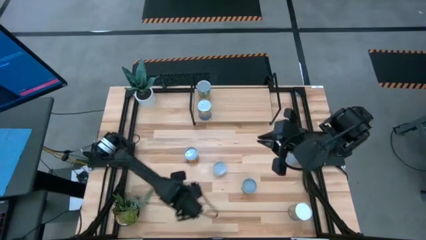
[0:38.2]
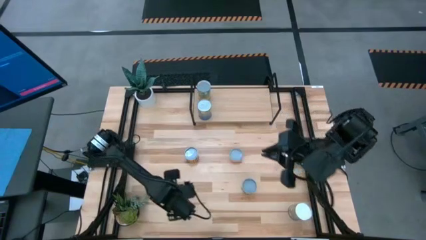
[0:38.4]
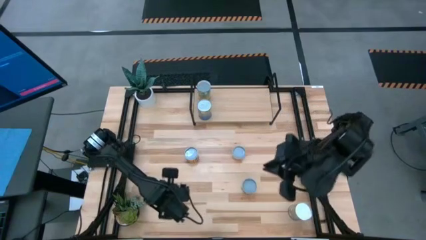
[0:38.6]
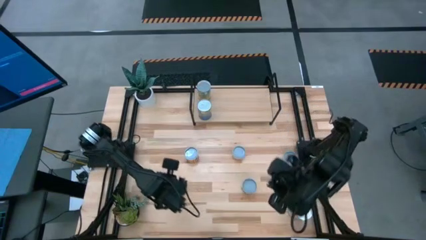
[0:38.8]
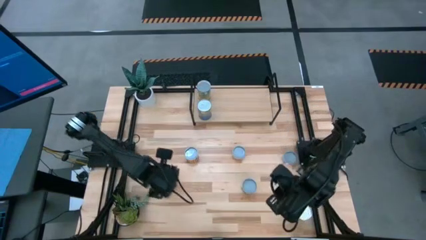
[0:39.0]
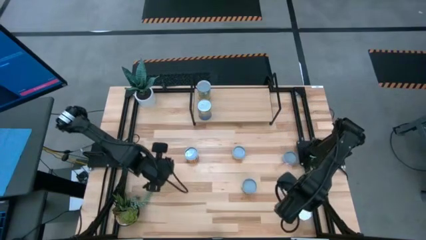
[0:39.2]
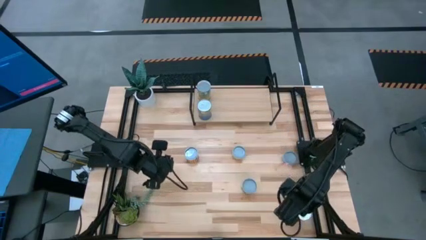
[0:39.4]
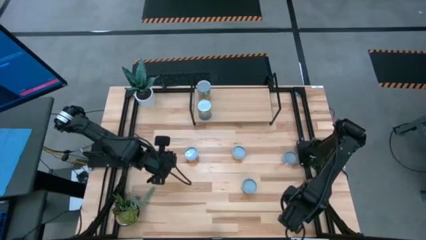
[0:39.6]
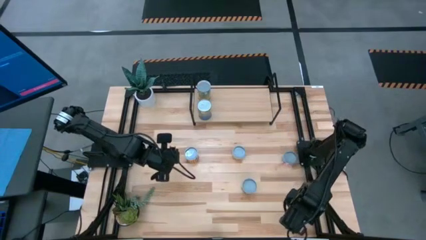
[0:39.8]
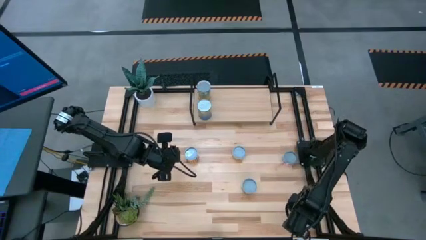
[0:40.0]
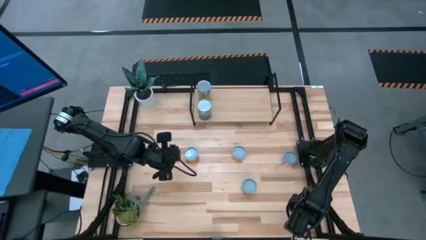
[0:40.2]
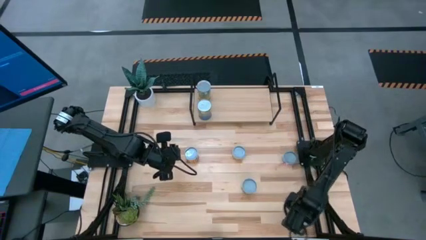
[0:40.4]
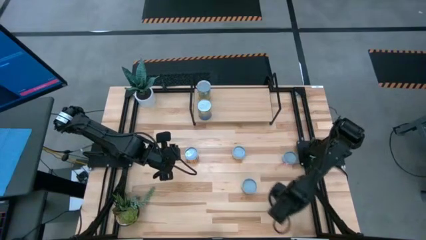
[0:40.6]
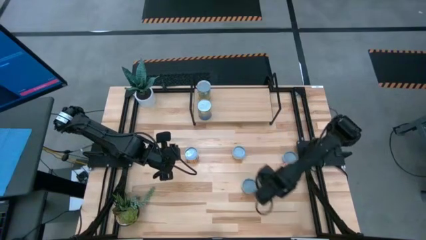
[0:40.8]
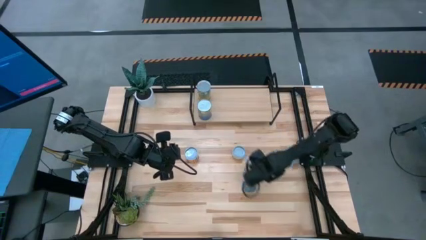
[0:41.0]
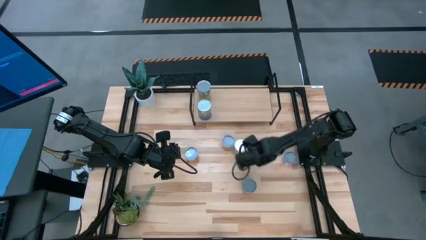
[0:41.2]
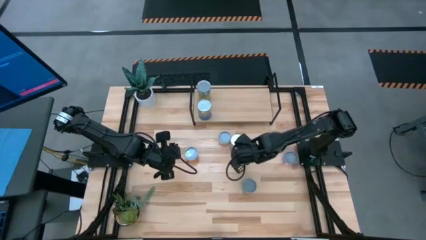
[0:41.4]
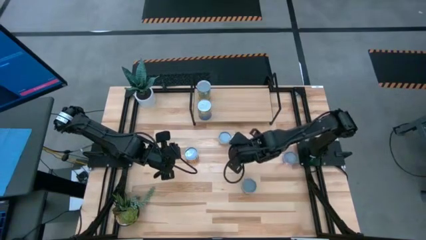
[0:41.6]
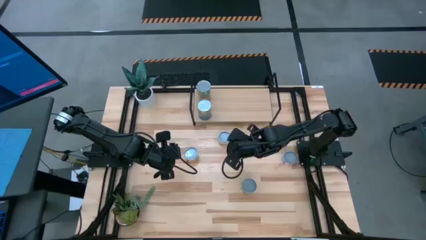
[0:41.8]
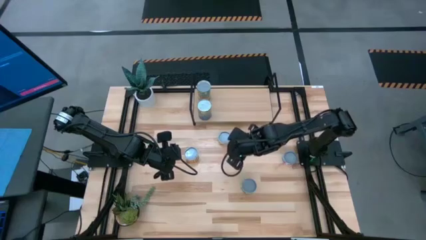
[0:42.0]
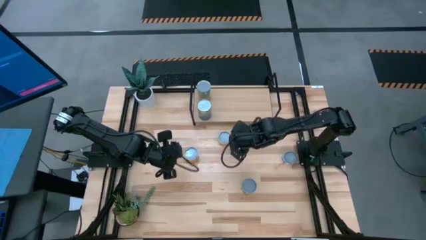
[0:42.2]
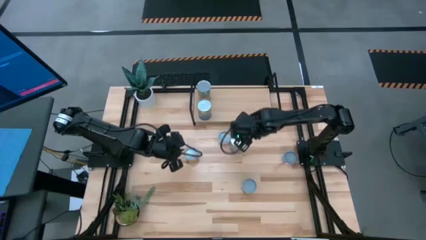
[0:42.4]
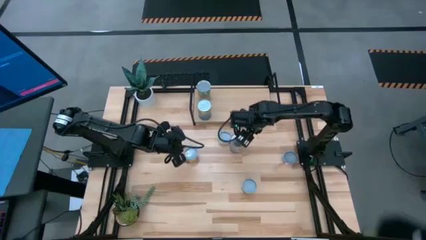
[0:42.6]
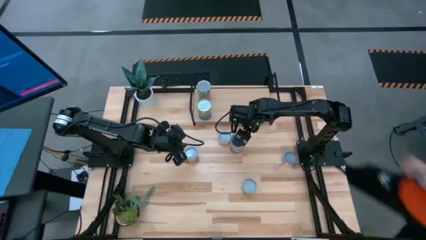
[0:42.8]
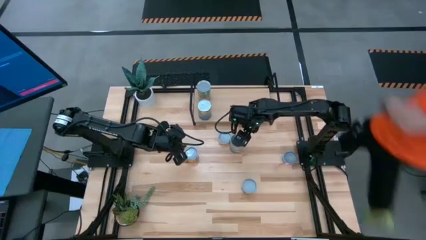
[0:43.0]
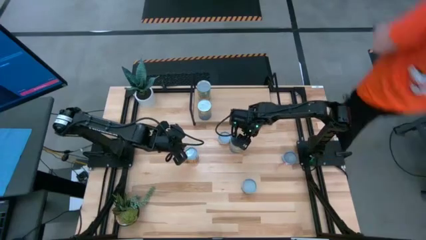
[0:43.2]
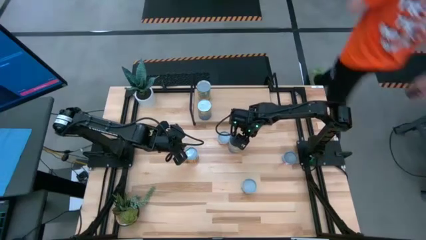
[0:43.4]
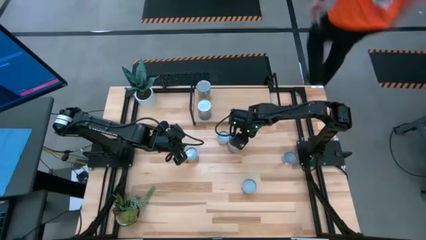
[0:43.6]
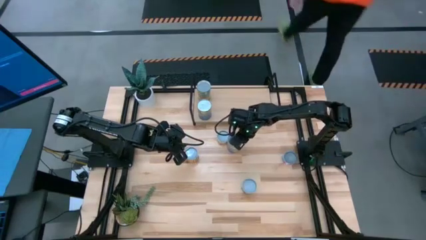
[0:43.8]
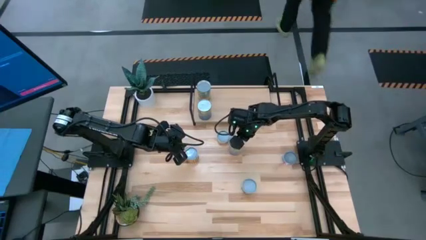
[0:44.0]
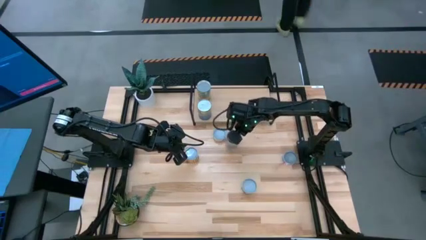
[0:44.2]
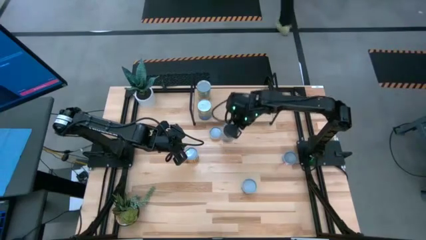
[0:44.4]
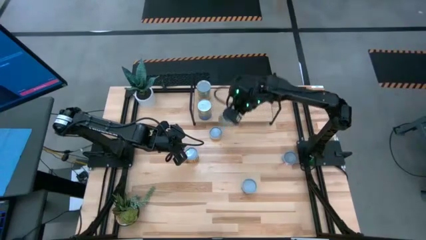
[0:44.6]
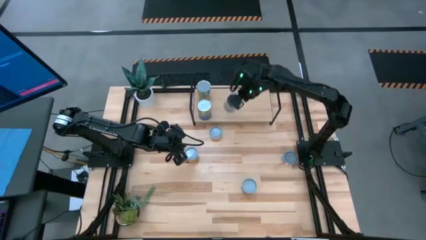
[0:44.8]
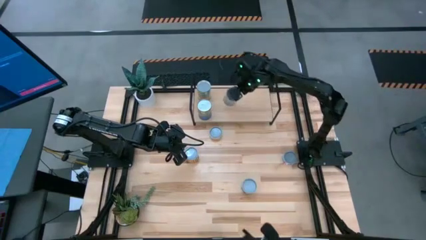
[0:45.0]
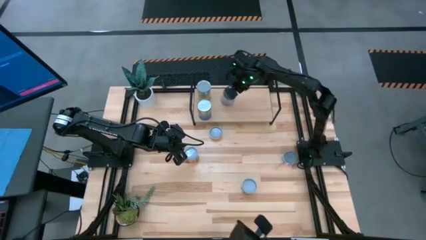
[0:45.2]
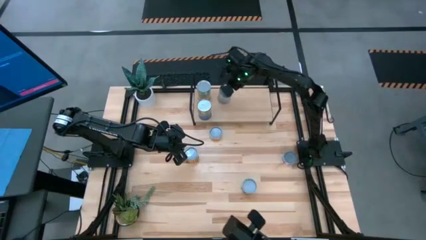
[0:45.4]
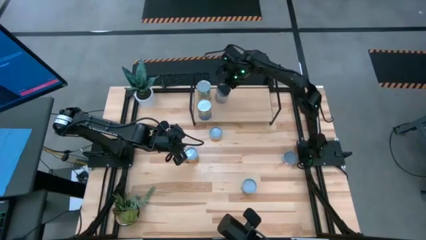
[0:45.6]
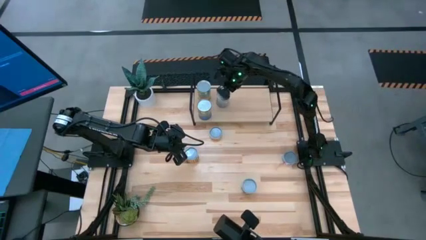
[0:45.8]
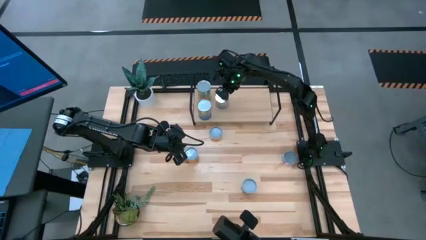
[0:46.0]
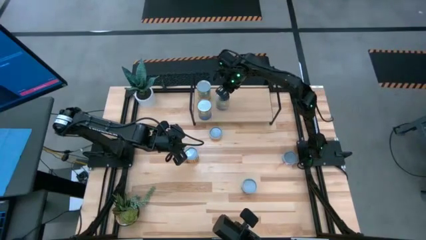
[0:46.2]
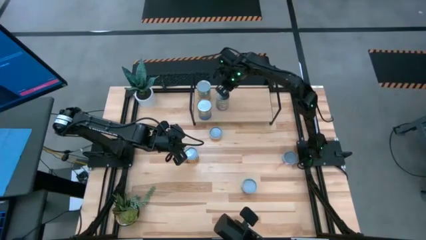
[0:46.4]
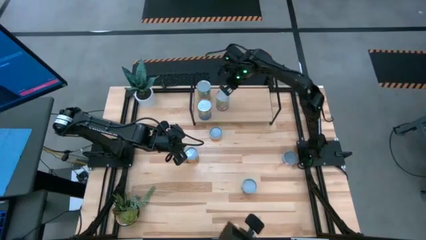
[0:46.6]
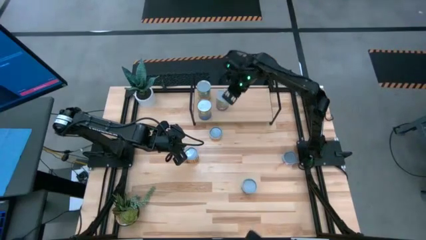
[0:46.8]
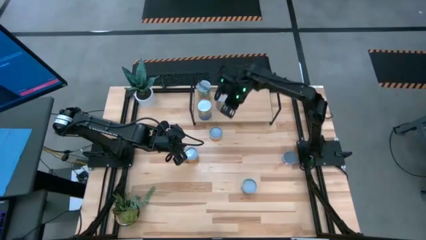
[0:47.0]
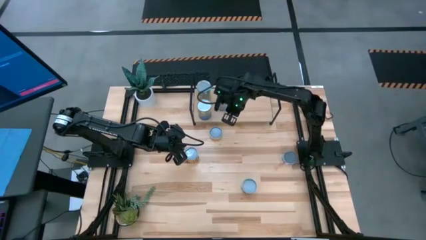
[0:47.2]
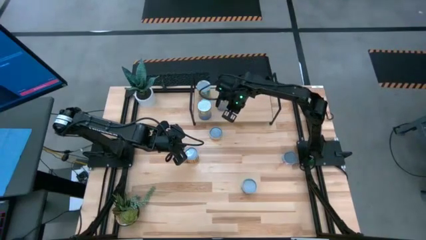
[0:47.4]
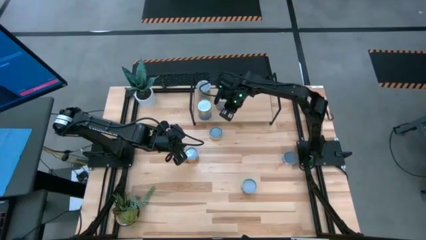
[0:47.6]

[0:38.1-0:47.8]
Task: Pick and place cans onto a shelf
Put the canned peaches on the shelf

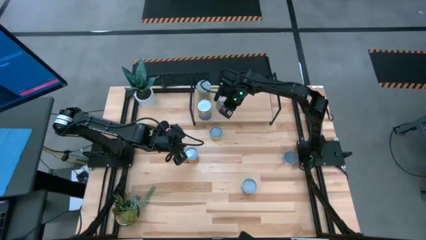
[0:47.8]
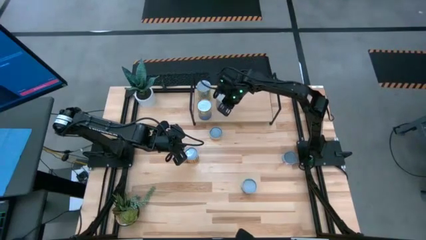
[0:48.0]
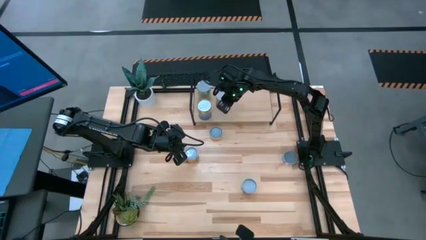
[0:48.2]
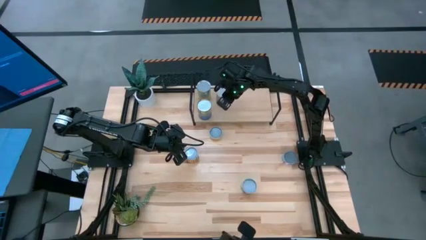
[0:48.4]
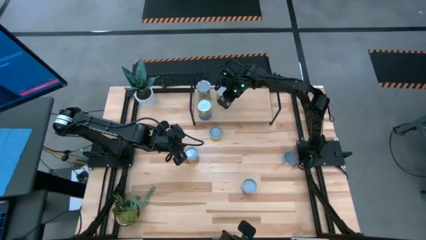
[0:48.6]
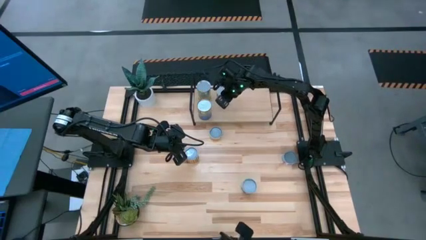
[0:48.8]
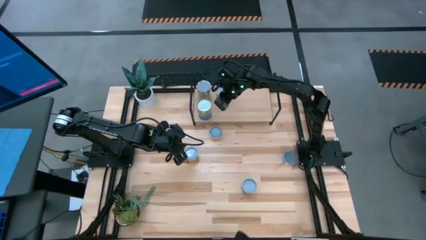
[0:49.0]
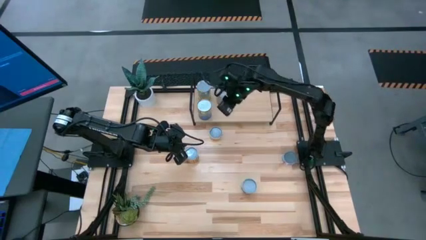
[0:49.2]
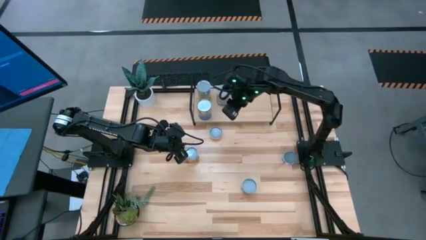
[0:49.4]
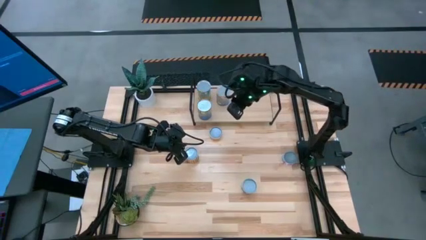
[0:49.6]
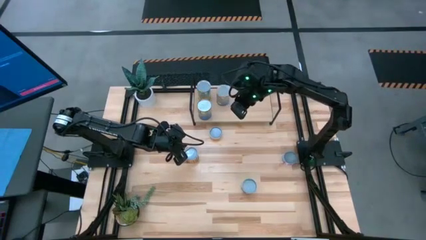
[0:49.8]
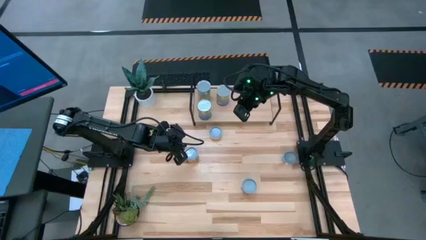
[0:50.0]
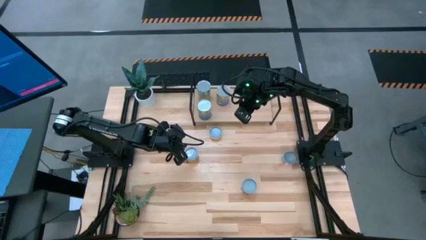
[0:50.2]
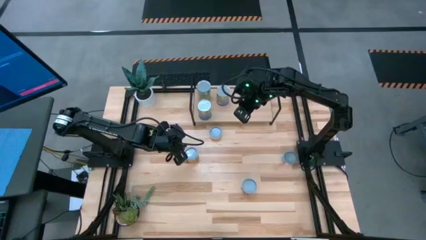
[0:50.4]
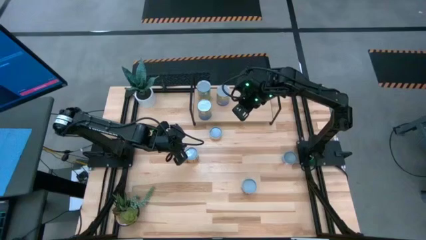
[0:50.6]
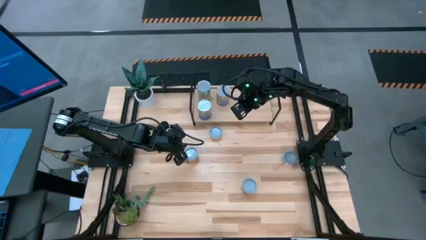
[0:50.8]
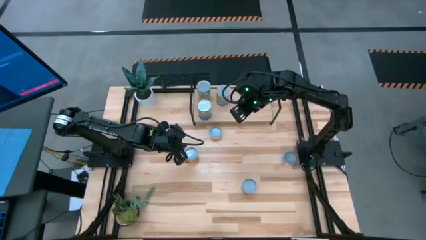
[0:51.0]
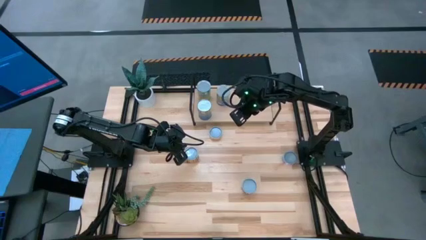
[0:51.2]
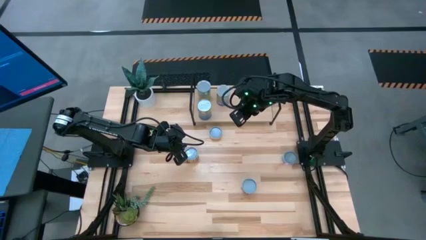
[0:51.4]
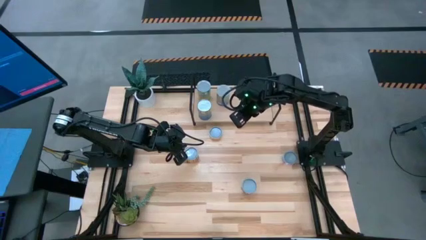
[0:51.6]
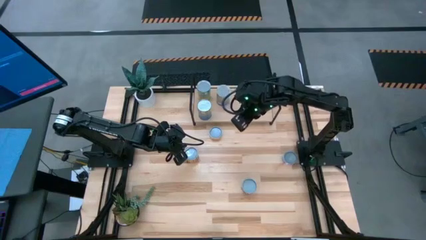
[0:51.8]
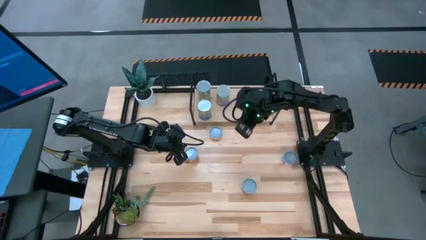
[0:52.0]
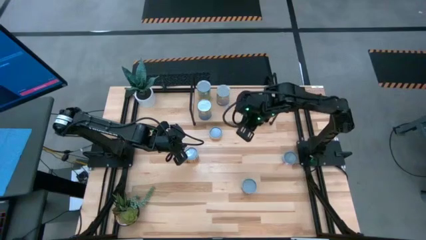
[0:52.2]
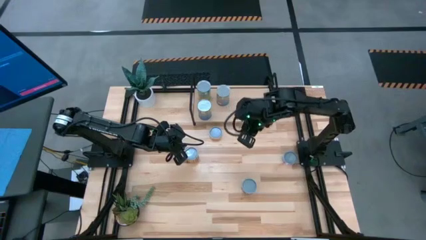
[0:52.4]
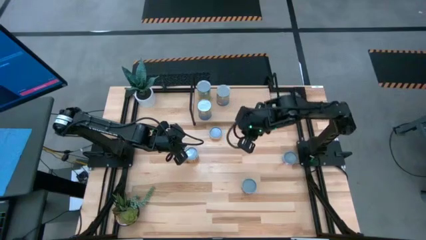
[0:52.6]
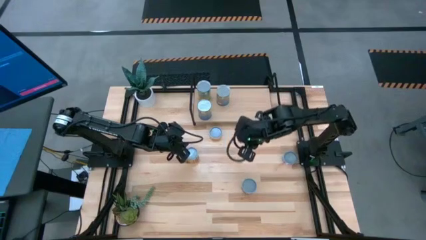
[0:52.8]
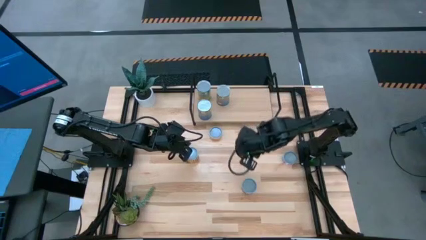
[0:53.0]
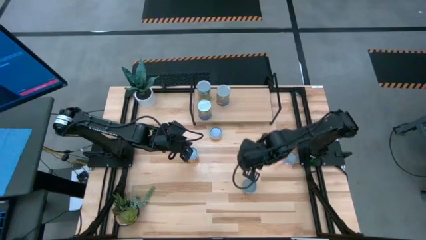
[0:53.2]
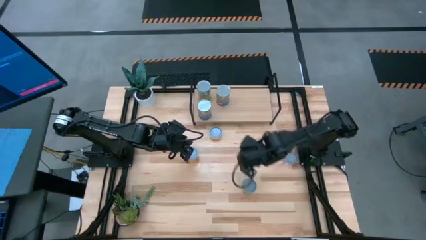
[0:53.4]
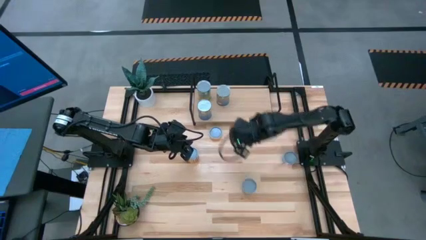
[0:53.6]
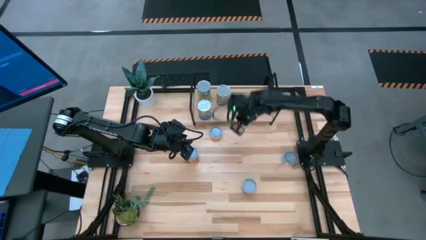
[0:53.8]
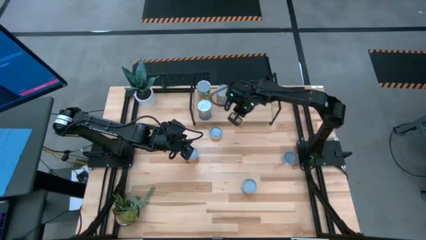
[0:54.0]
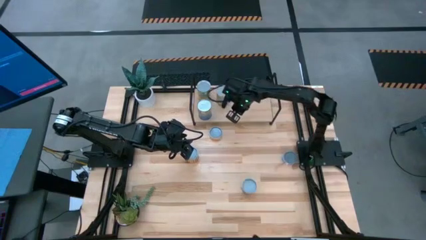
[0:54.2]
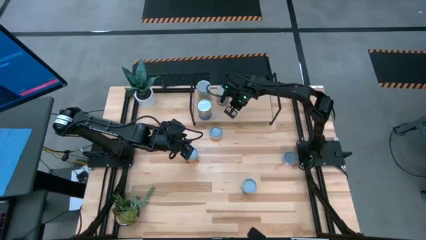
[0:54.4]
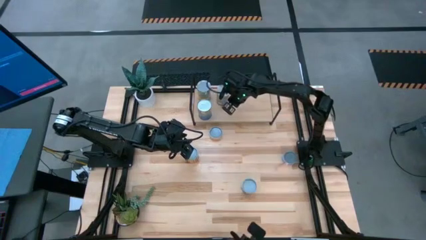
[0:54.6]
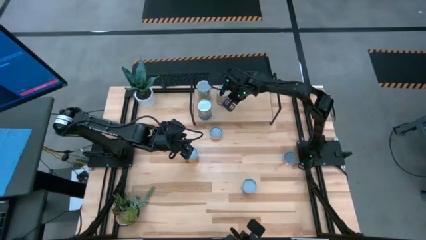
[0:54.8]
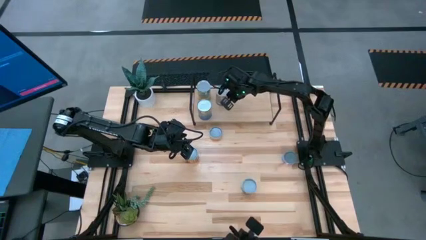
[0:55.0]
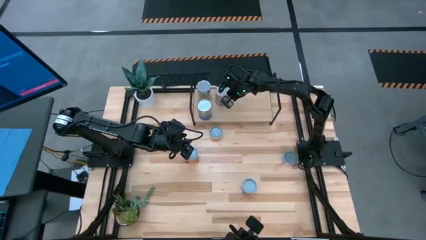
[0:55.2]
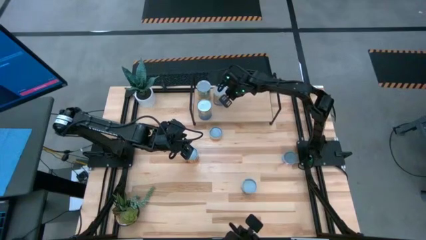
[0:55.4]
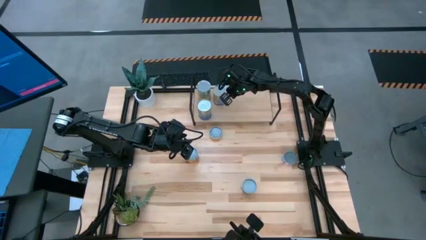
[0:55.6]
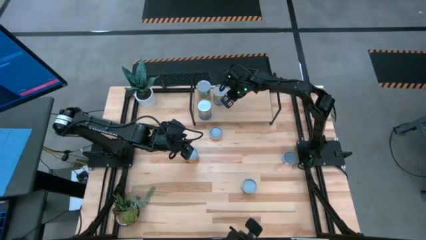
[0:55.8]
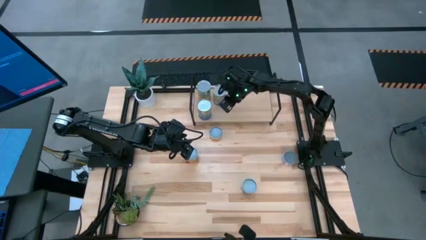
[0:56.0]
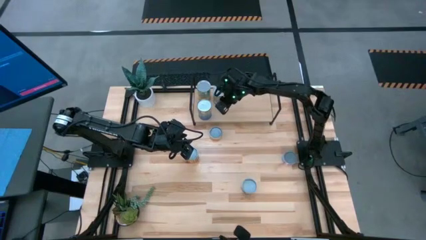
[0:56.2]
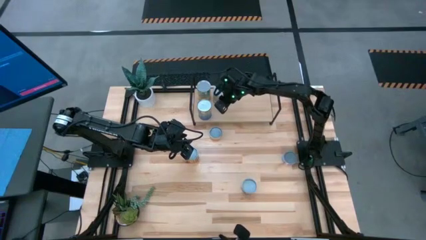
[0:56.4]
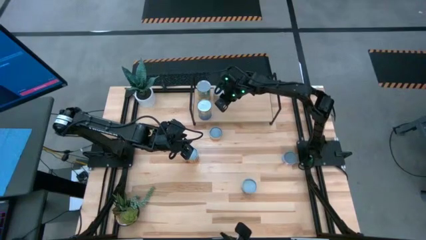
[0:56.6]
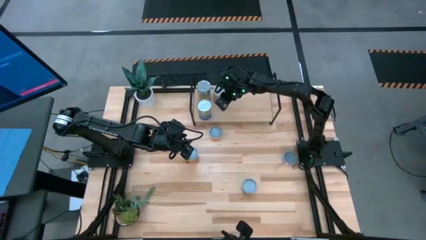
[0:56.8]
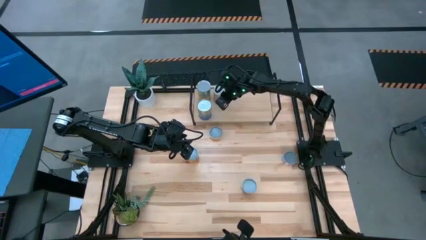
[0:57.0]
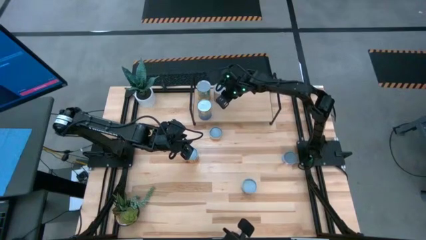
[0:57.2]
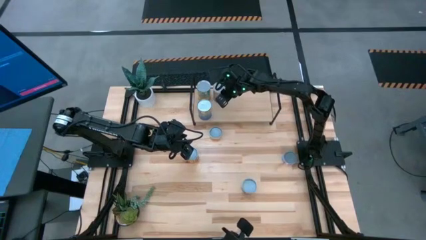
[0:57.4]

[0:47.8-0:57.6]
Put the canned peaches on the shelf
